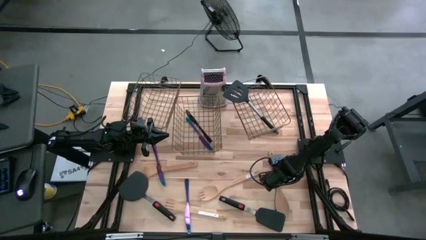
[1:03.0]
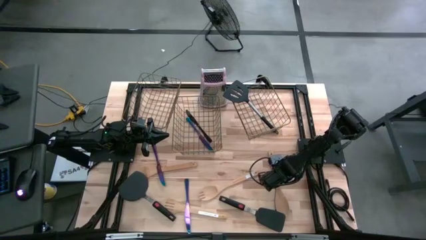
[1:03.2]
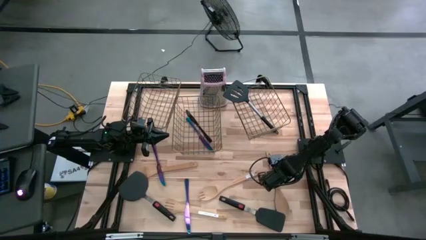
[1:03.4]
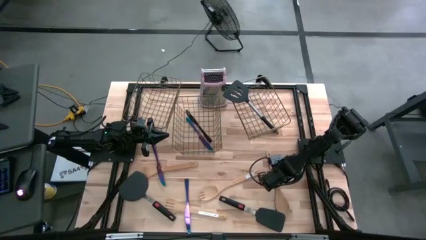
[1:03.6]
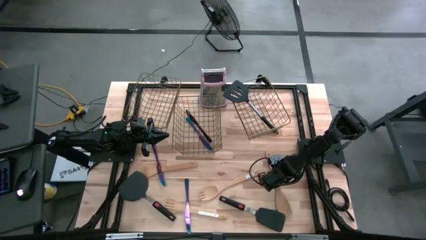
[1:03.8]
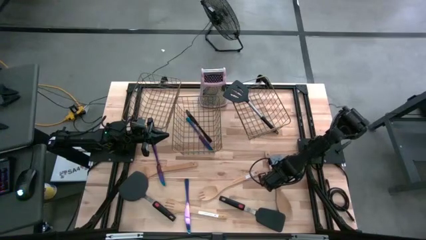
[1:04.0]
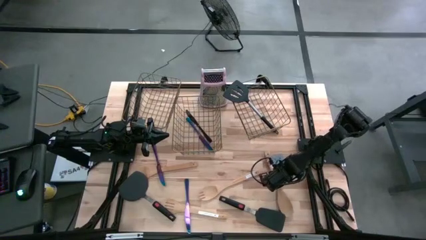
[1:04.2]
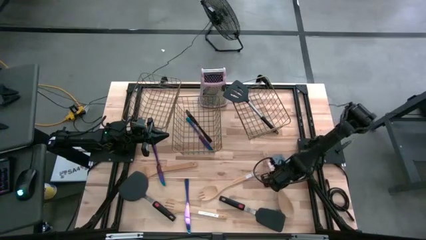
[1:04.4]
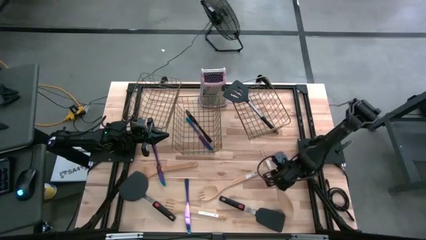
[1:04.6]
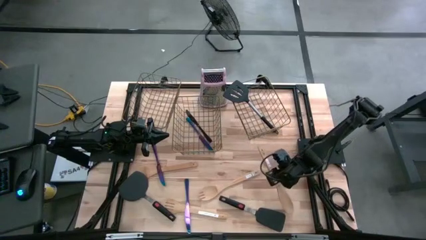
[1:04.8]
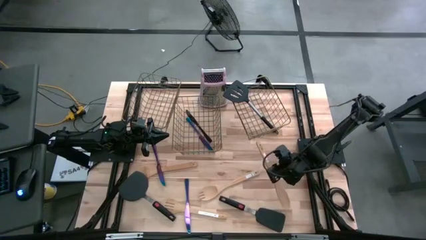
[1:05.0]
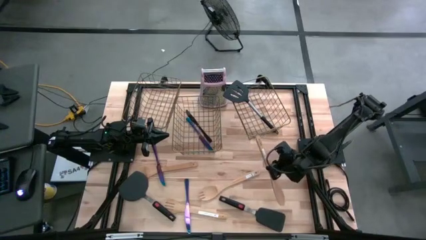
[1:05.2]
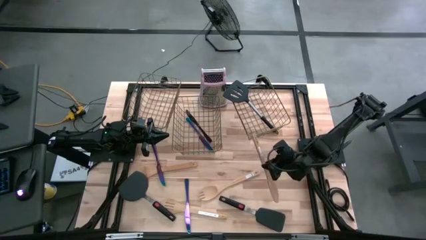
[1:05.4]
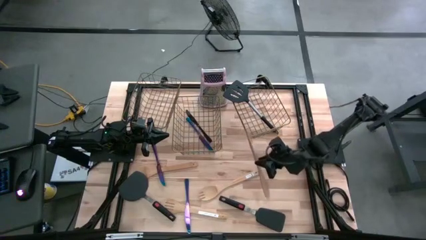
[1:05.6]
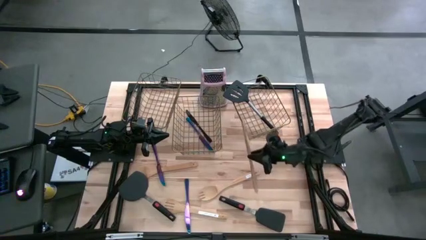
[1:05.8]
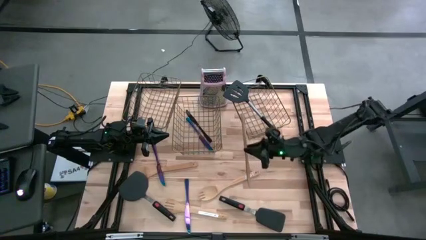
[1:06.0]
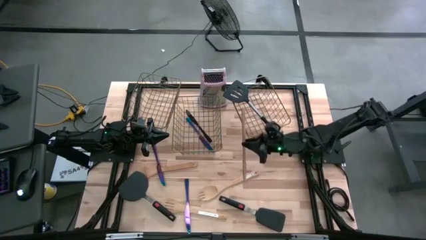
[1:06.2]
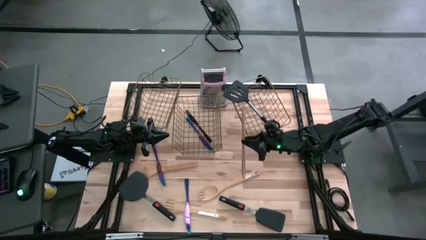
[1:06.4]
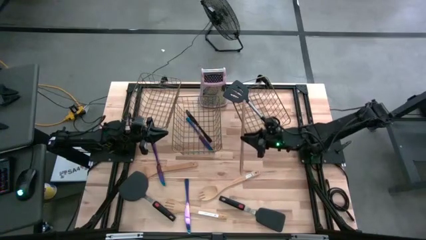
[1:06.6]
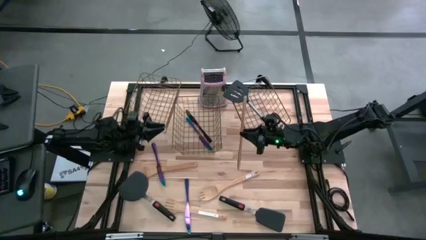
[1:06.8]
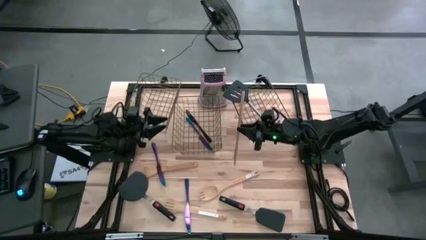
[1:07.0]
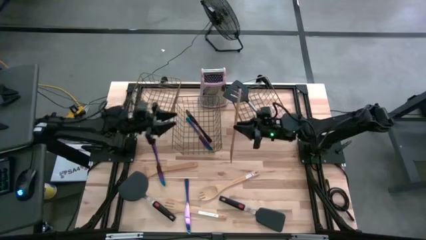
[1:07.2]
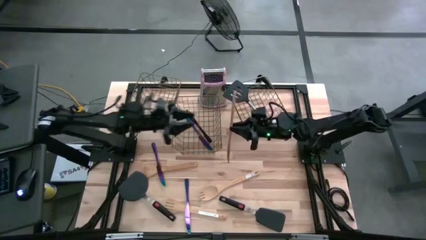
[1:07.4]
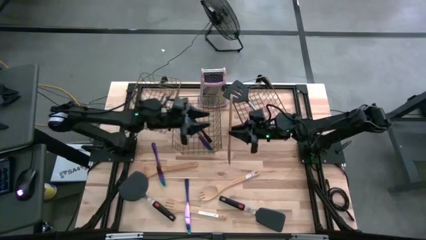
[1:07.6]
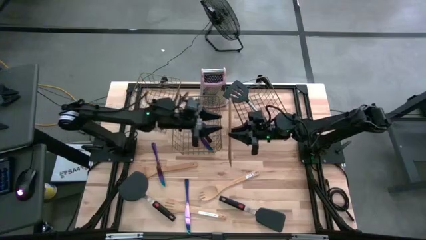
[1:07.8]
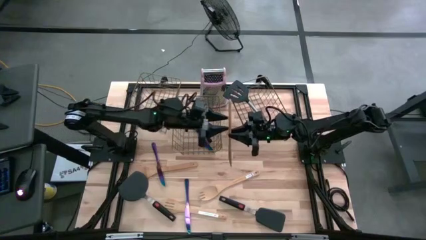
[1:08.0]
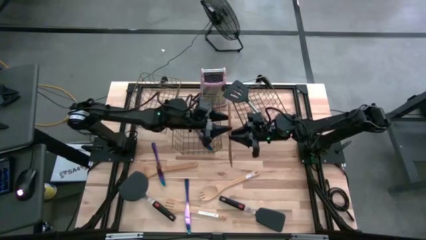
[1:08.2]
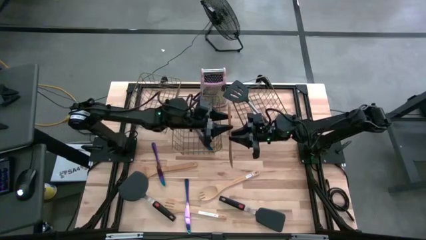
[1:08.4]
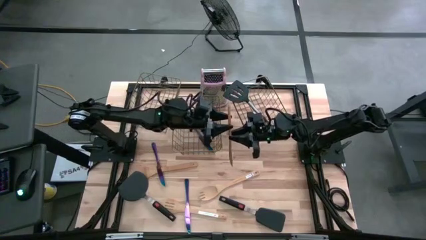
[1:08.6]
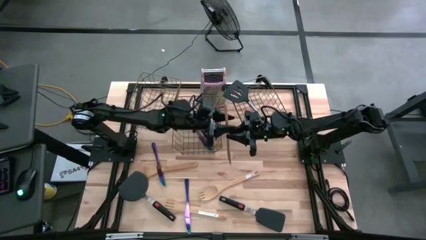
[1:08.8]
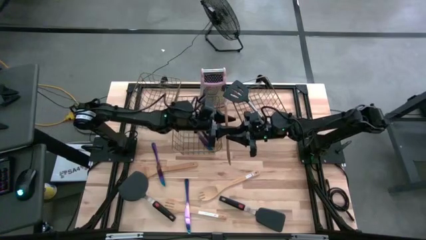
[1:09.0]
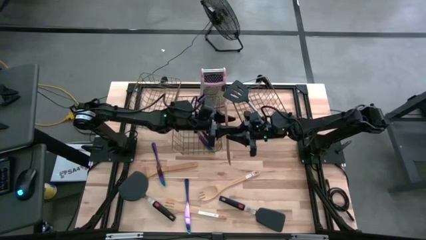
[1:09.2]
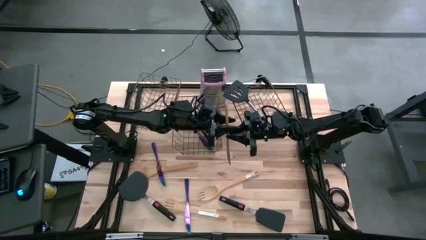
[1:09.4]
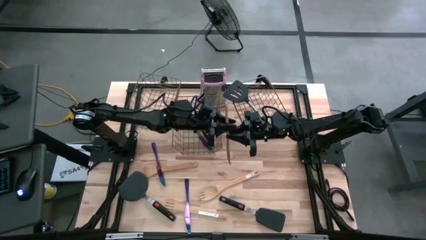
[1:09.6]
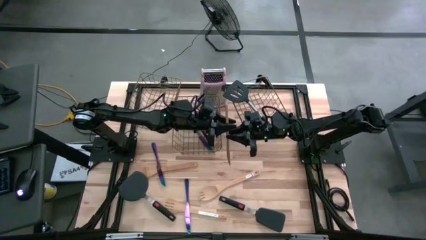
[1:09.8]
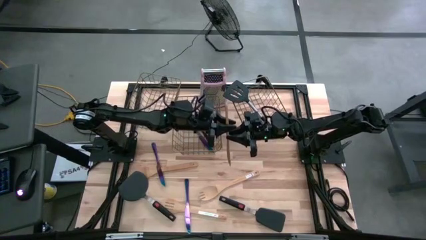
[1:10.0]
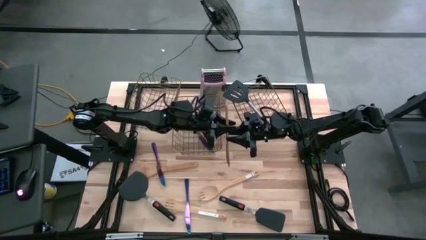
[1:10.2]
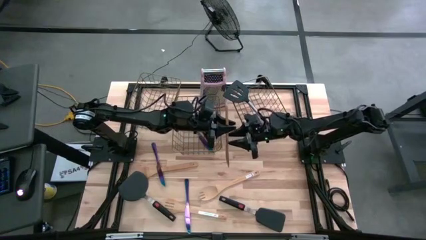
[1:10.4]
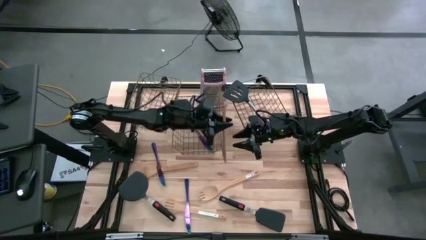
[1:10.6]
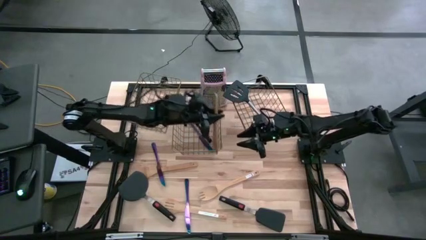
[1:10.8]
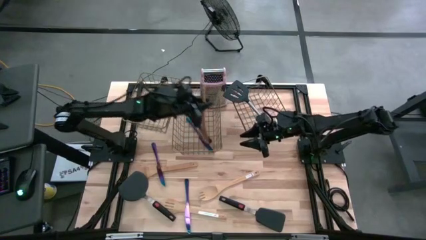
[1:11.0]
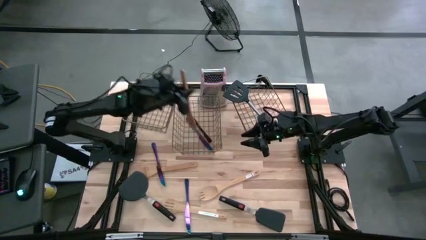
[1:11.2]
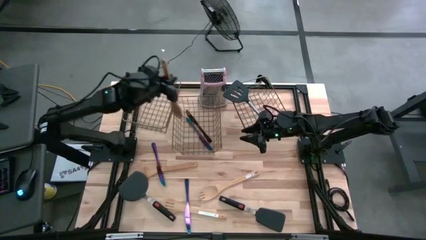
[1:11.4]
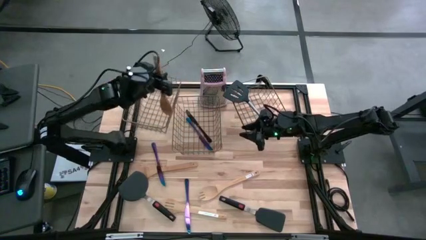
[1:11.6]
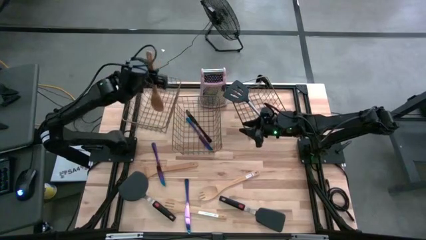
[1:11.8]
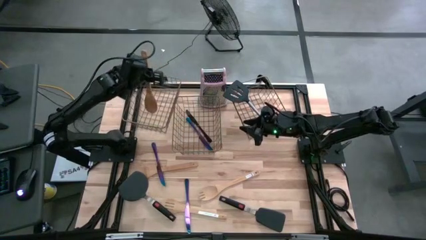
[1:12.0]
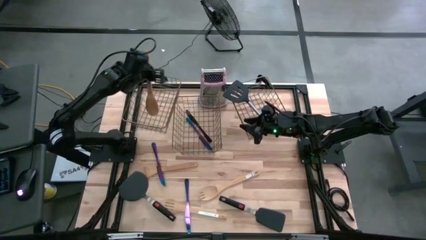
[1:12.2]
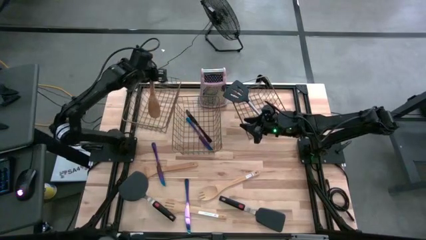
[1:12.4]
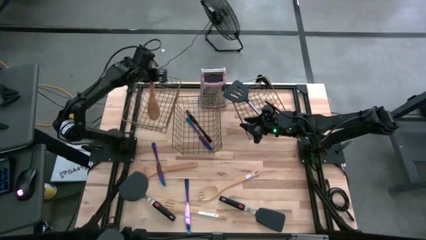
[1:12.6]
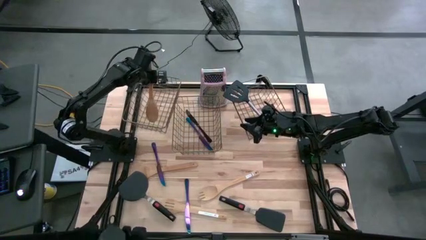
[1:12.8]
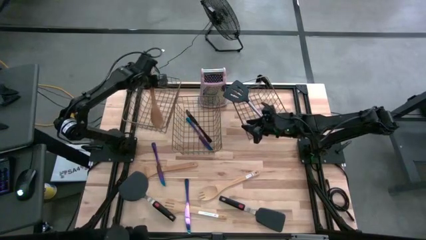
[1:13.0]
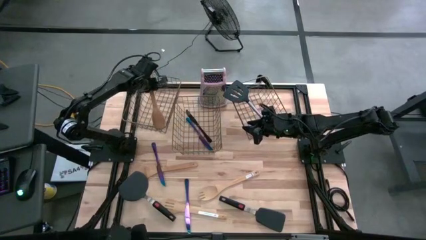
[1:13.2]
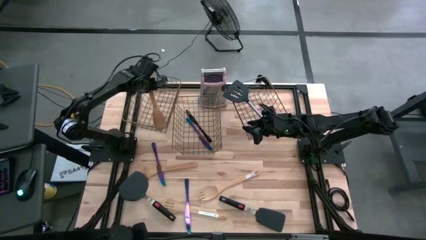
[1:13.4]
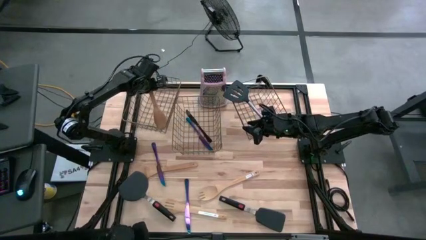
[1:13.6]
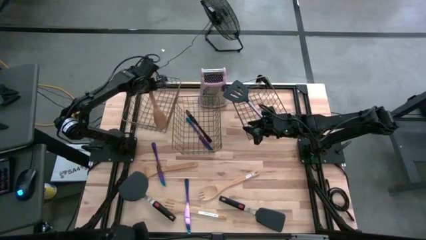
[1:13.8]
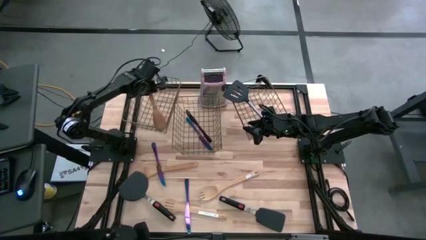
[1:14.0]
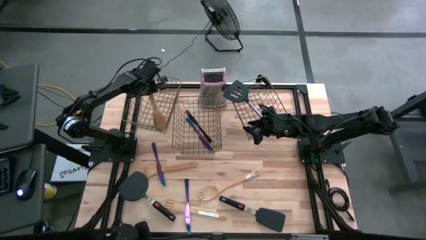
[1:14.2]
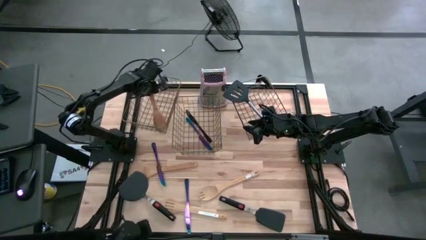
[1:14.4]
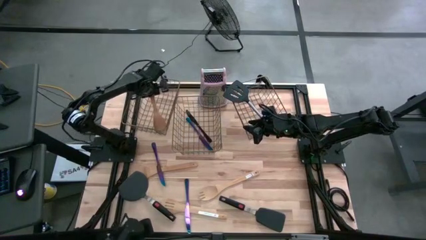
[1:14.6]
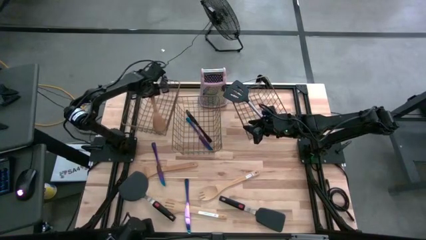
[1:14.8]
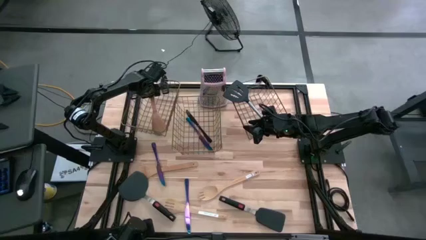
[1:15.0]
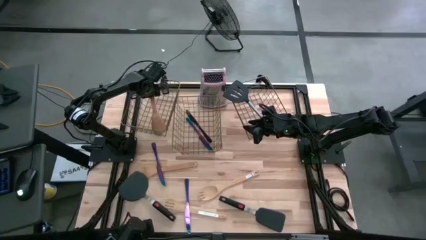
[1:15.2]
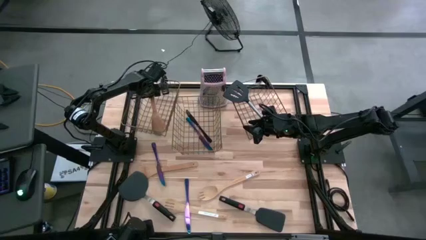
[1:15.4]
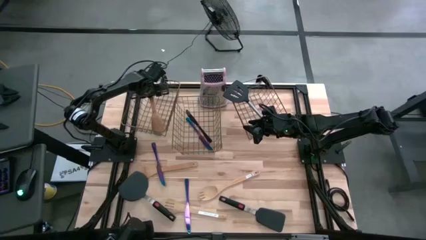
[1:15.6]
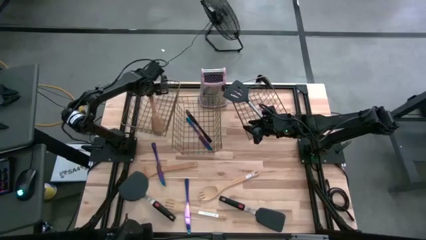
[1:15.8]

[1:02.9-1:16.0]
Task: Pick & Place Kitchen Items
Put the brown serving spoon into the left wire basket

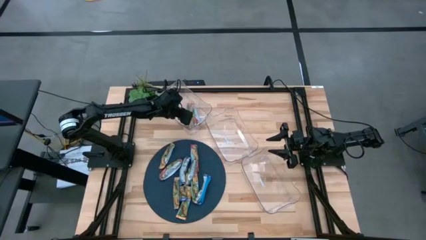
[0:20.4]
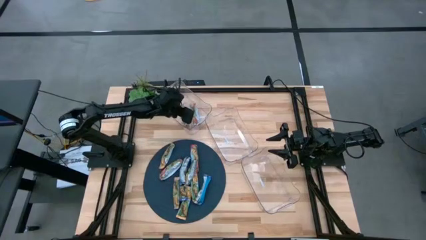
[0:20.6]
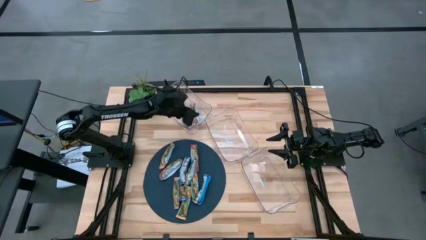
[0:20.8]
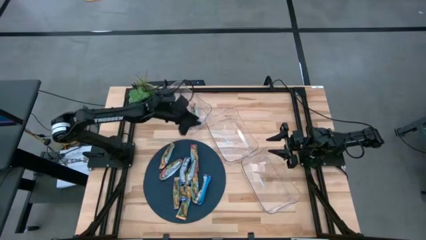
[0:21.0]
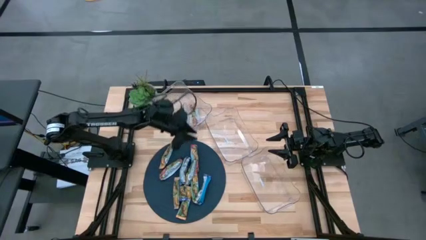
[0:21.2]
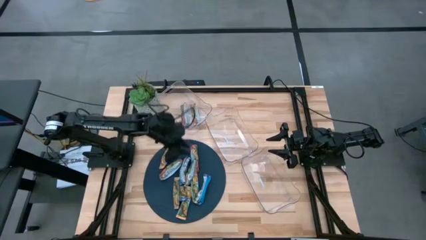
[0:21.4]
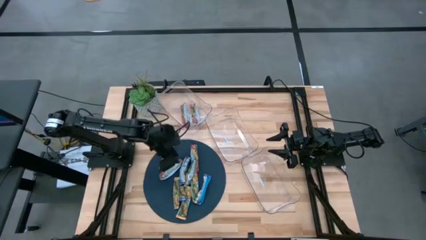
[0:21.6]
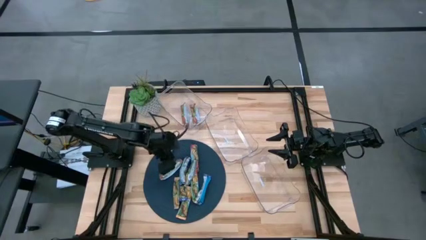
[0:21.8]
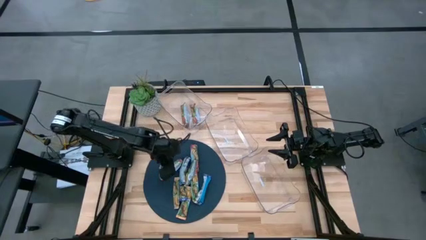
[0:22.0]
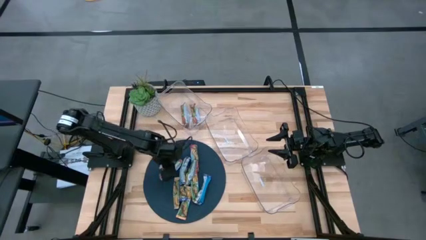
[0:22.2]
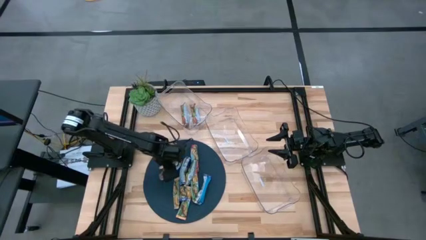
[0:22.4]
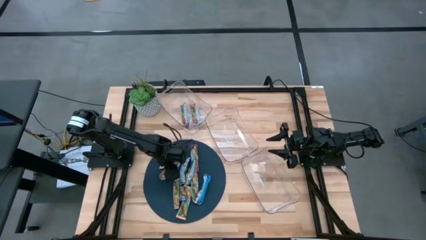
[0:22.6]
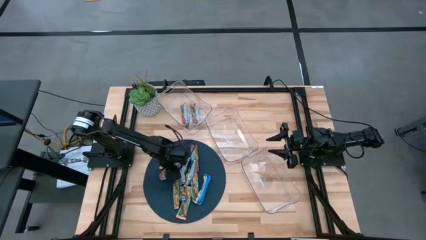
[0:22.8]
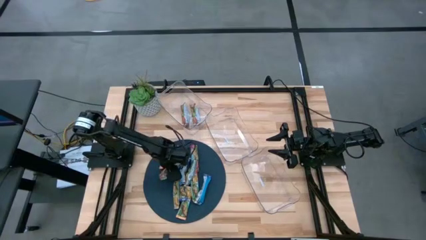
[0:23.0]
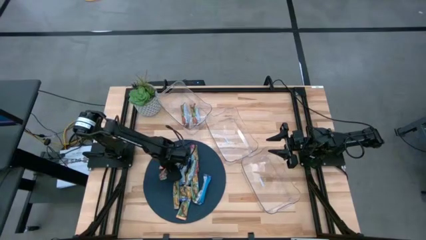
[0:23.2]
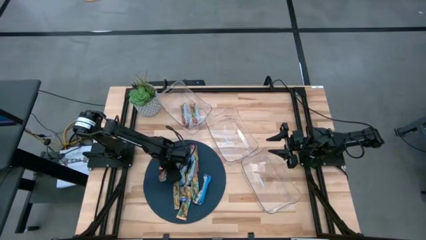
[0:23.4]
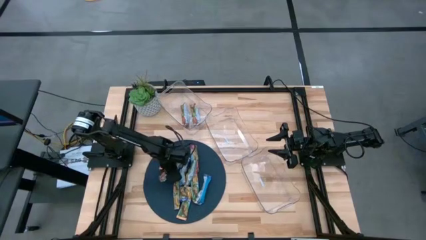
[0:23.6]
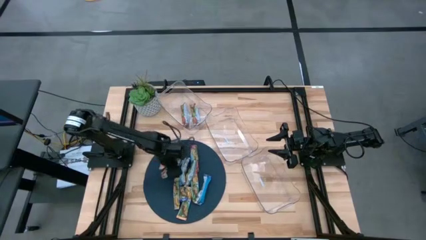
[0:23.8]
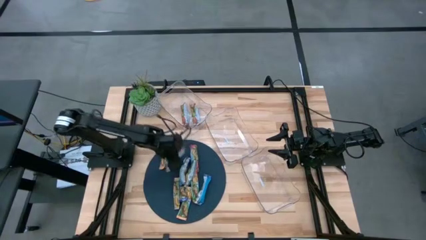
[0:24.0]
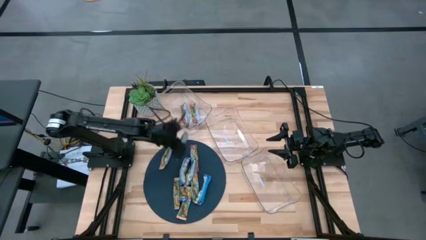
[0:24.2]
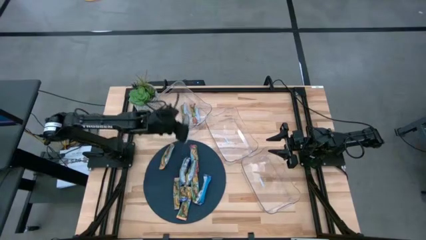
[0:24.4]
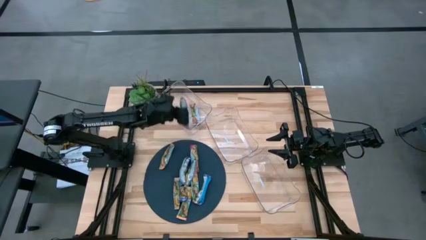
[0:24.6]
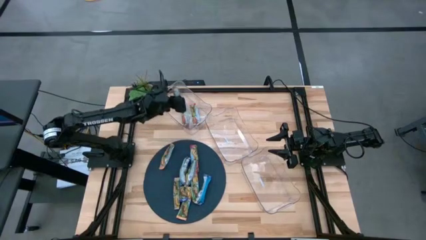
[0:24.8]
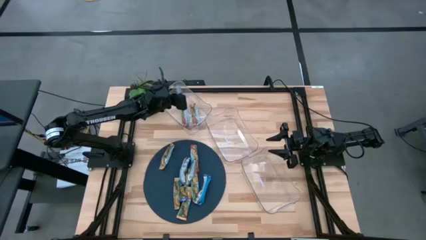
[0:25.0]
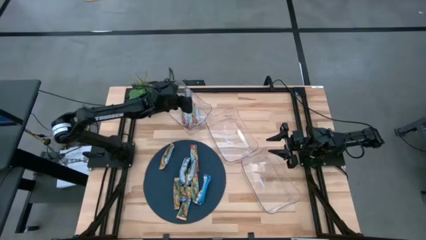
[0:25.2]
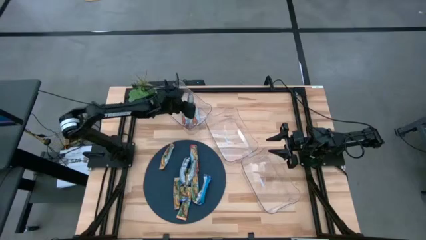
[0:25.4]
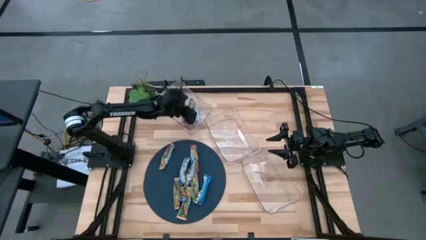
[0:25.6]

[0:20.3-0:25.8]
Task: Pick and place Granola Bars by type
Put the red granola bar into the top transparent bin
